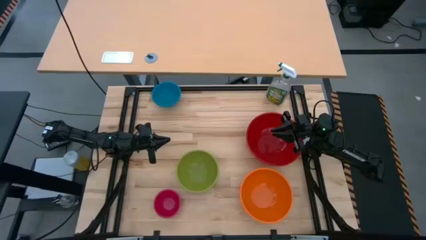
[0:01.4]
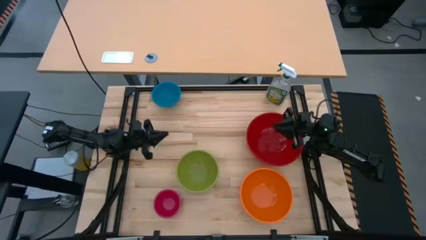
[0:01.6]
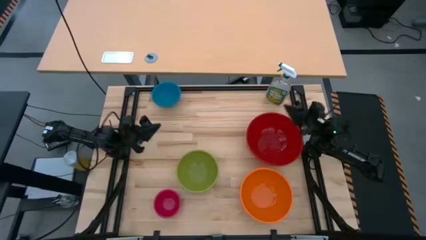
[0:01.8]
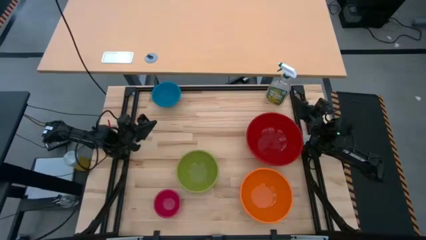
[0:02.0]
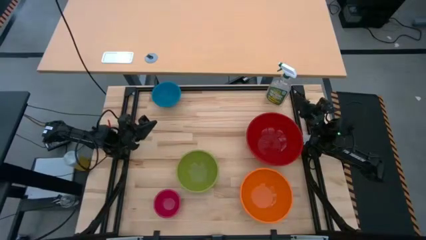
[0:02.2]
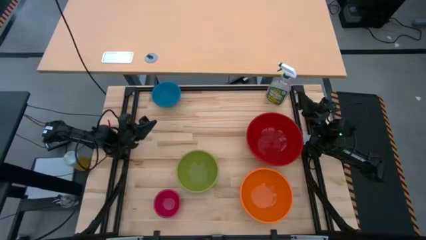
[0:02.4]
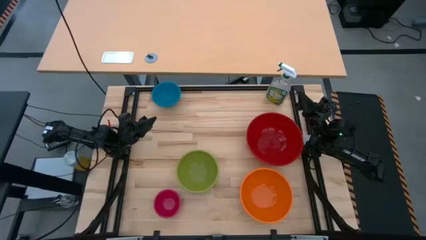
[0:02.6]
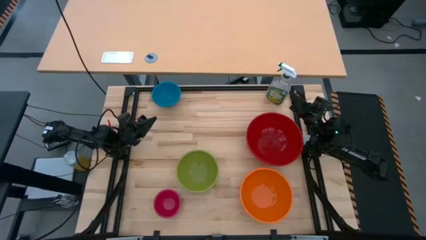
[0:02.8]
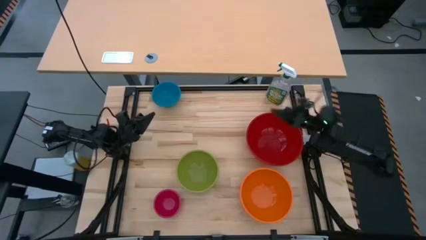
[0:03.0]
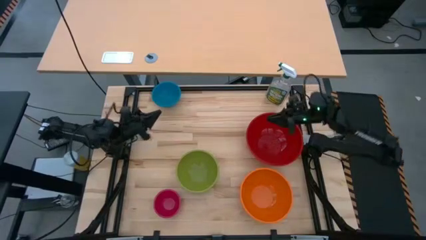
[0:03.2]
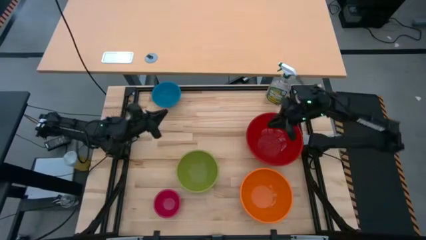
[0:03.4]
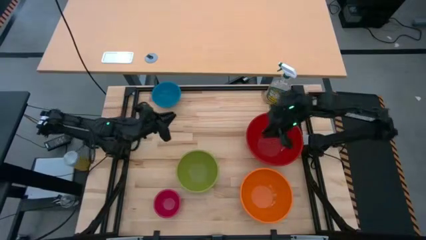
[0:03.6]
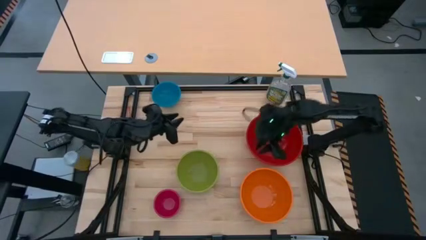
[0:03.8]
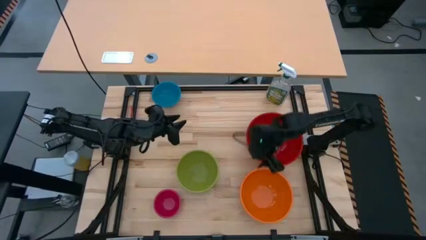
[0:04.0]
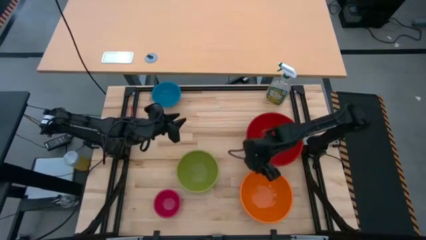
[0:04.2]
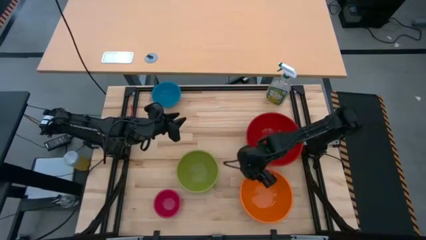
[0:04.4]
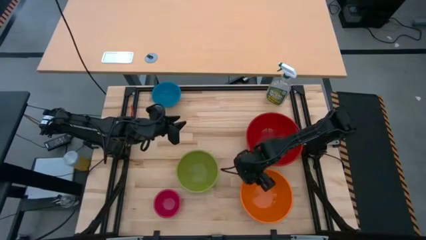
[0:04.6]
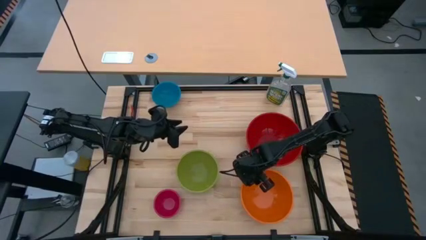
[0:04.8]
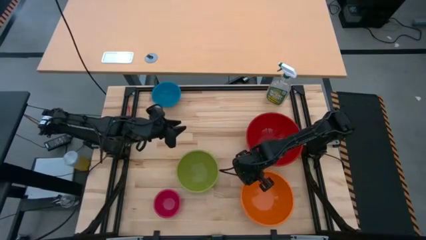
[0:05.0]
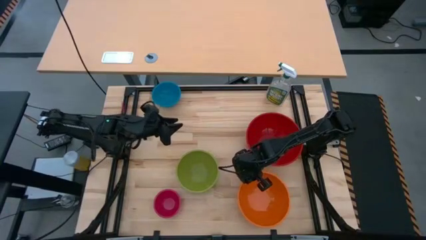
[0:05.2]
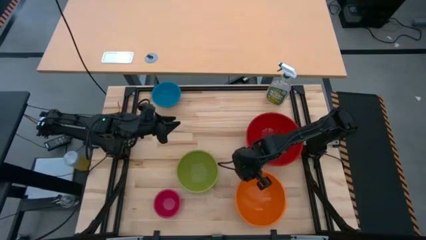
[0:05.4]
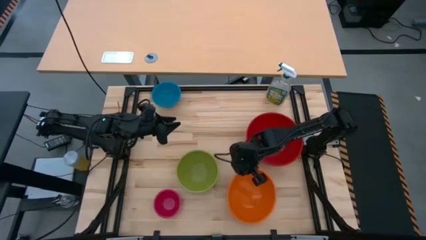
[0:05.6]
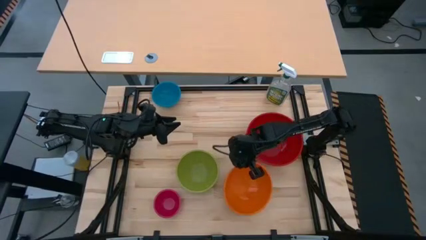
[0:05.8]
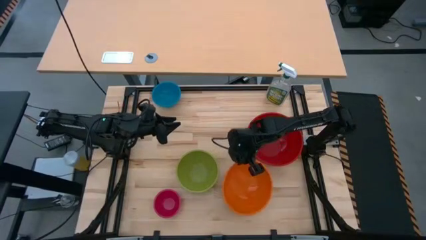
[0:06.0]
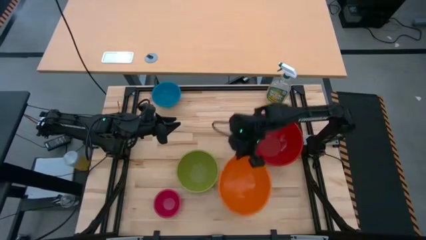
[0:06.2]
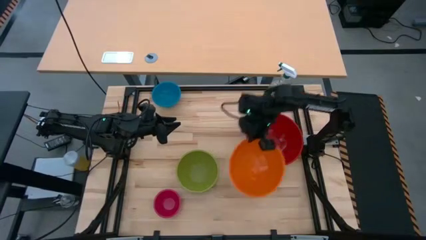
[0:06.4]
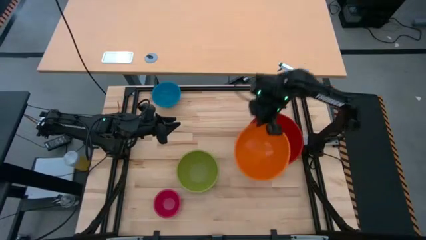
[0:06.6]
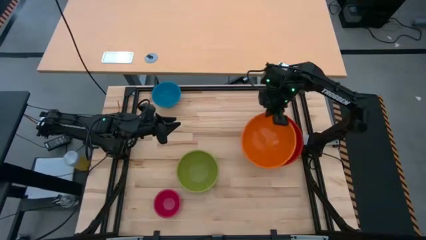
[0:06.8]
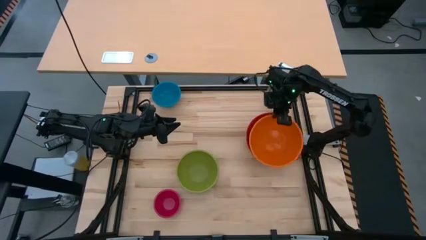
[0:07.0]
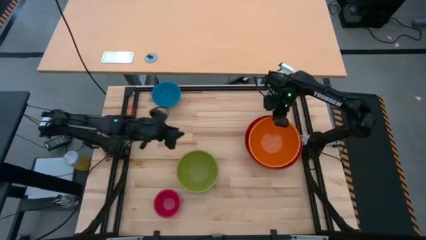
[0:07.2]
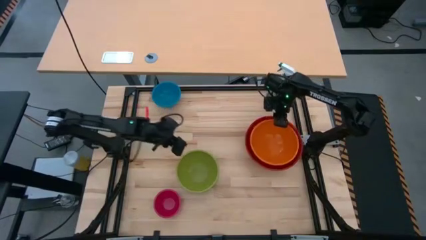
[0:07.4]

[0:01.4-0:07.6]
Stack the orange bowl on top of the red bowl

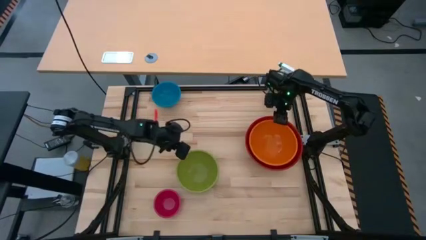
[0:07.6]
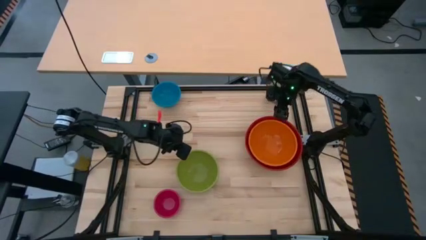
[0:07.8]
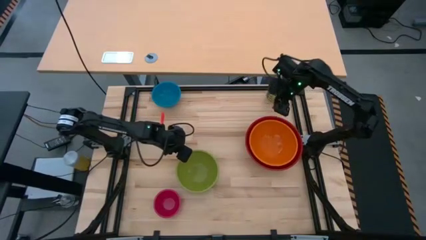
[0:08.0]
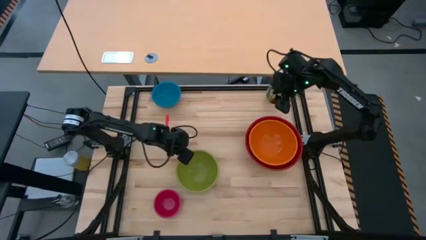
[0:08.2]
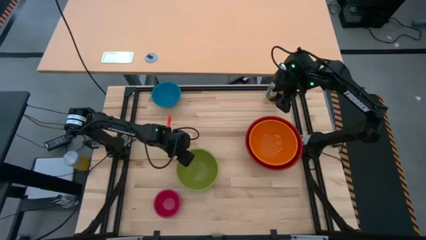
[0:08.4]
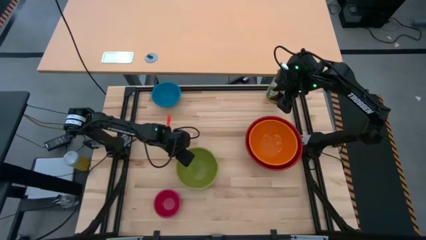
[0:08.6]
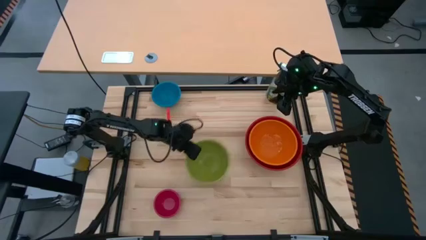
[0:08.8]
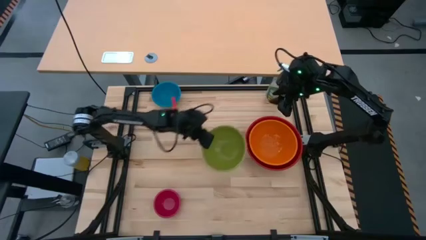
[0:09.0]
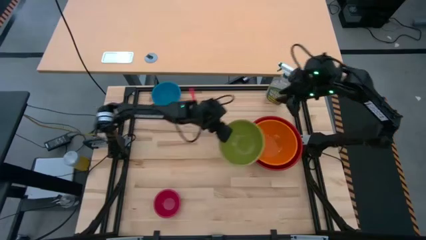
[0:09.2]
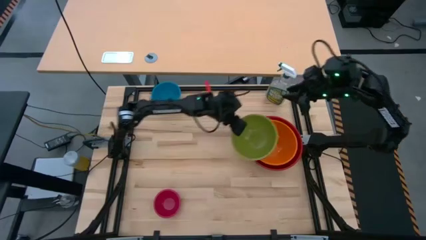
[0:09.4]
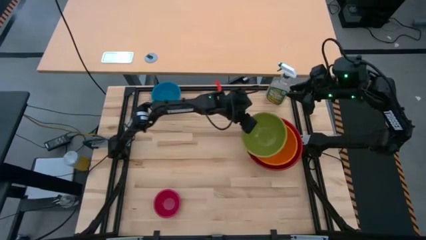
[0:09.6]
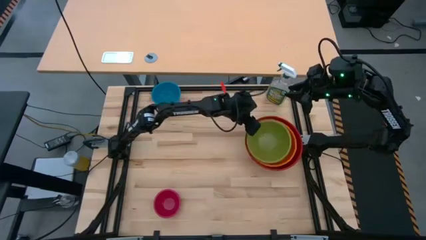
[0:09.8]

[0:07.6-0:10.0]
Stack the green bowl on top of the orange bowl

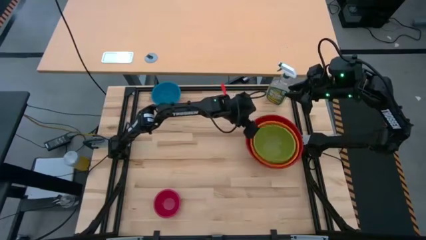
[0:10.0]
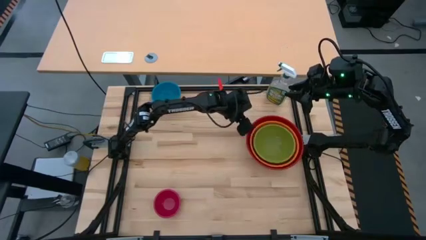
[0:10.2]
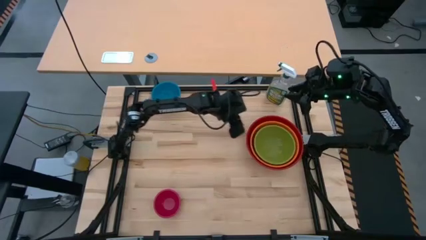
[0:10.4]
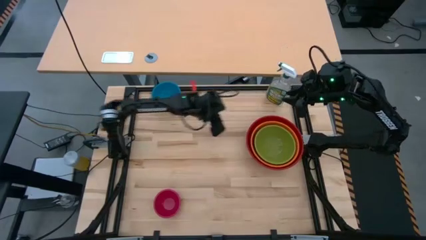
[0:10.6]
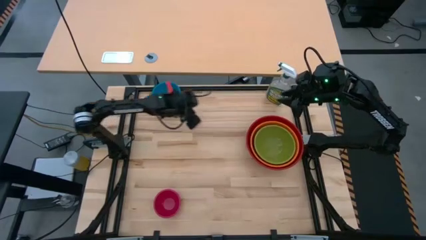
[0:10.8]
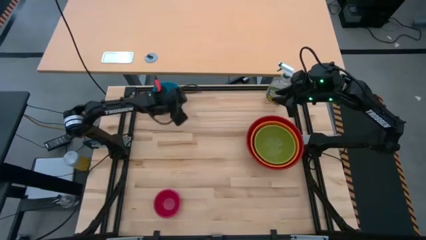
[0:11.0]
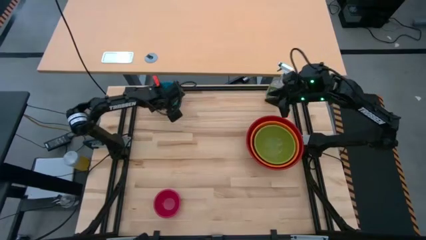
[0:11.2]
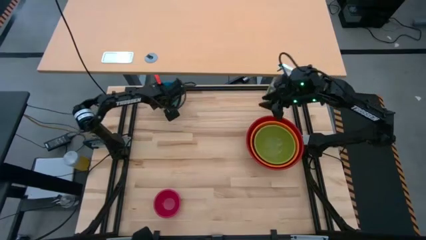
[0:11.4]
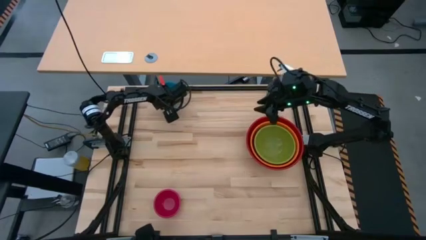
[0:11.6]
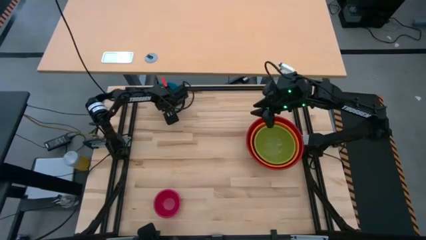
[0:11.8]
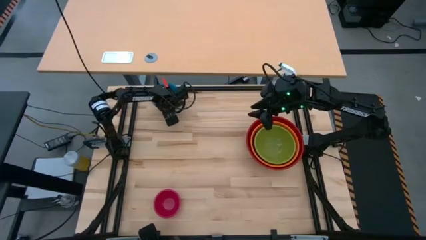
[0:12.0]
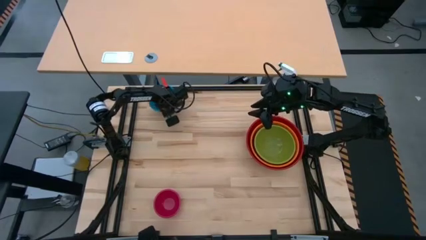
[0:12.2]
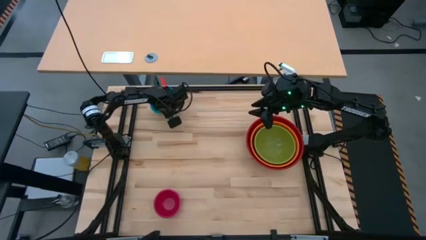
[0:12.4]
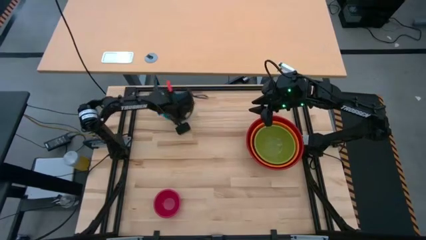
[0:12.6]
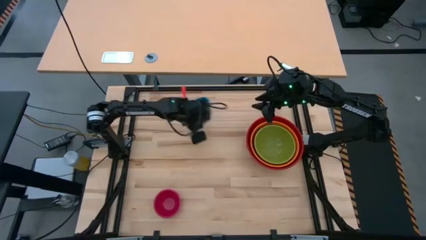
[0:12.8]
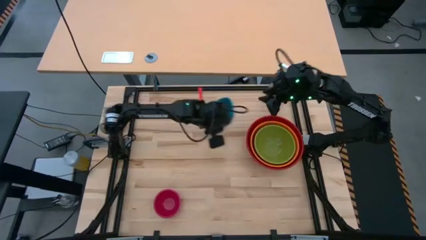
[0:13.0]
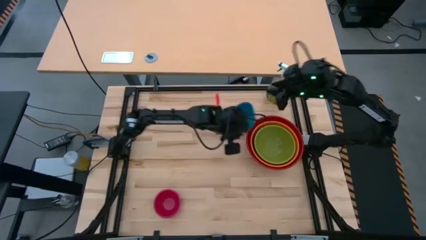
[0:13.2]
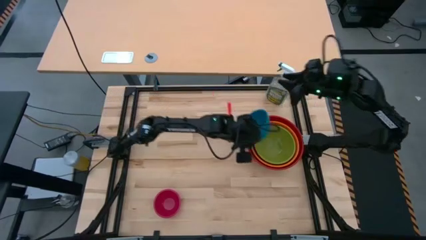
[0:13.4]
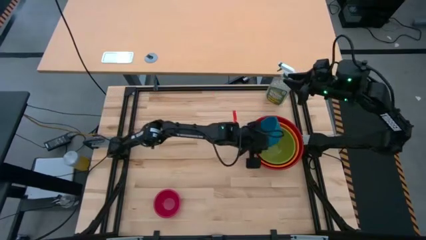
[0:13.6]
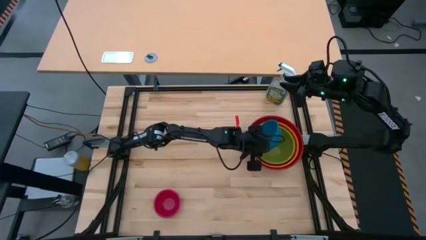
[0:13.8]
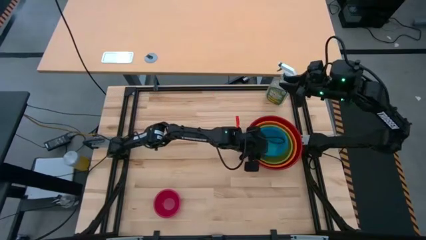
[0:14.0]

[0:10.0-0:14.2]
Stack the blue bowl on top of the green bowl

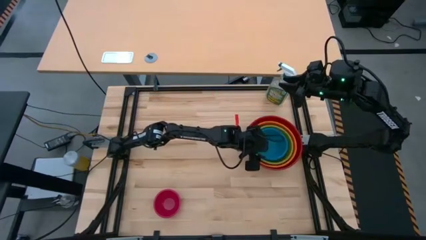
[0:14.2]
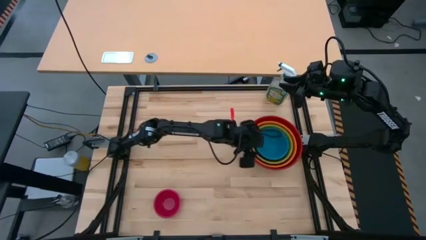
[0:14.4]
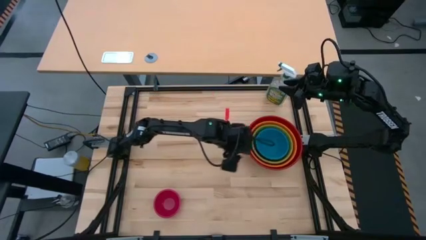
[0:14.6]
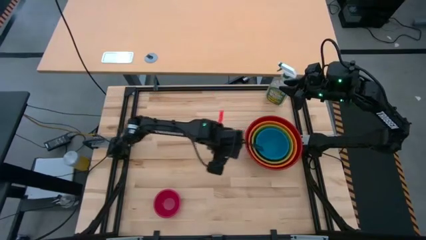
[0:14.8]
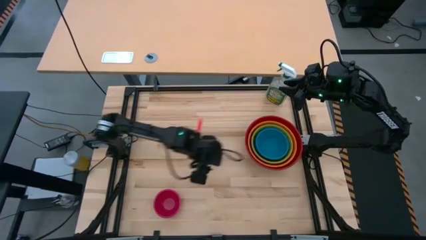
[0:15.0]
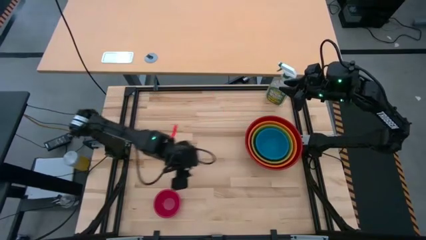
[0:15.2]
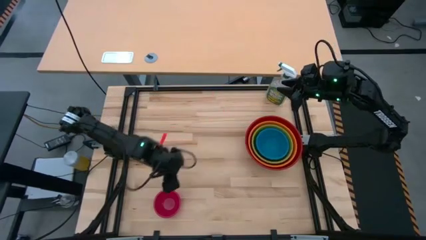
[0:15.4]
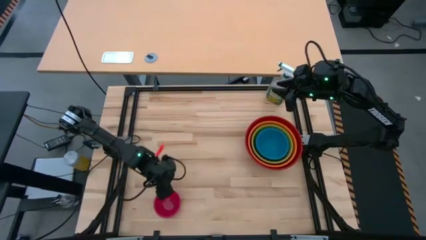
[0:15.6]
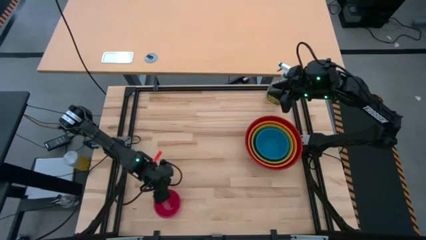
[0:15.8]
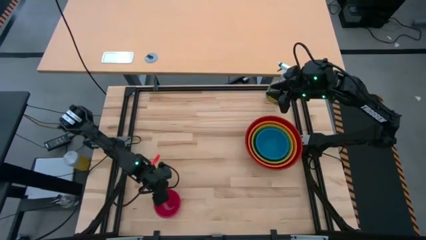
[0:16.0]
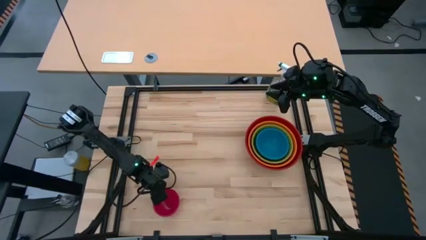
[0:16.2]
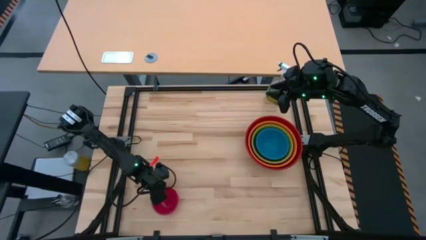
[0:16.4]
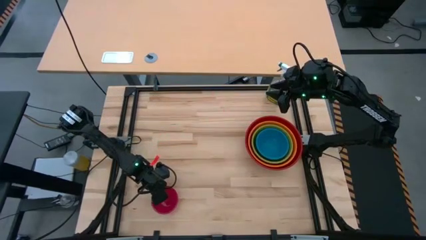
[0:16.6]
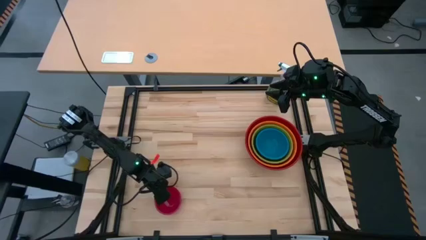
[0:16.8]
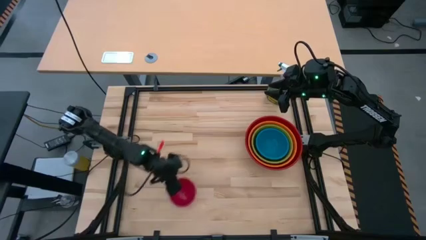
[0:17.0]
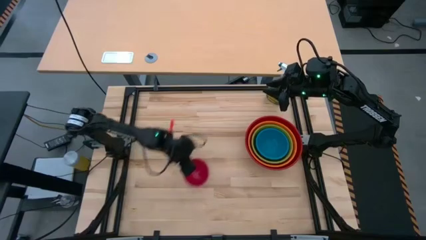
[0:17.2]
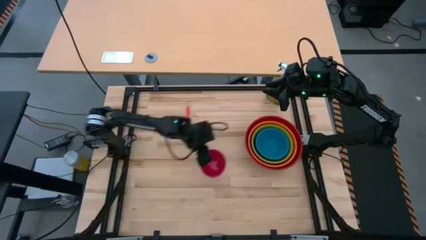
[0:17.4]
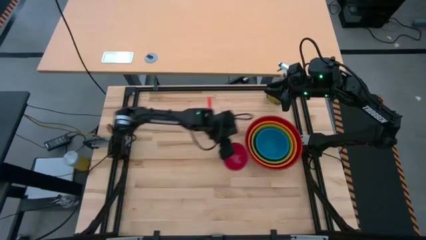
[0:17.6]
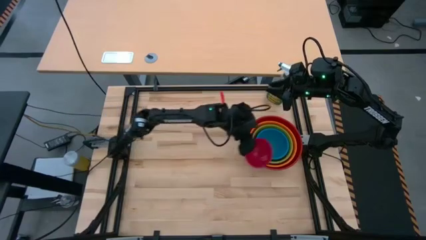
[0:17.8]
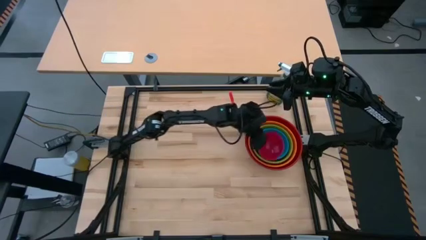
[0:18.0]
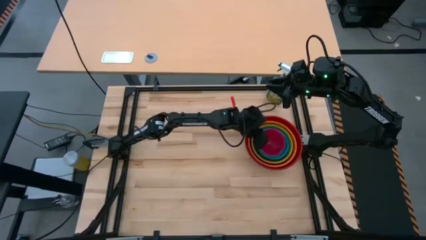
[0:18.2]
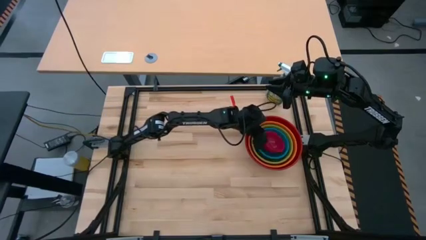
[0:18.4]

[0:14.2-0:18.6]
Stack the pink bowl on top of the blue bowl
